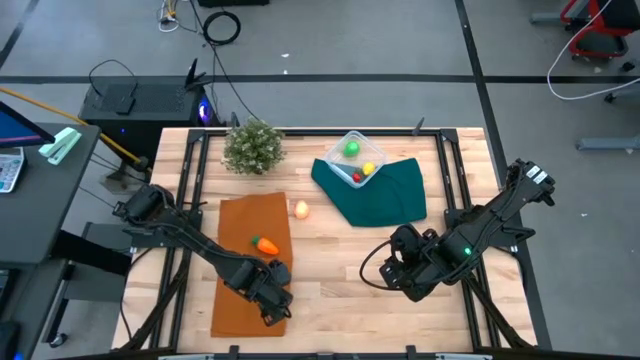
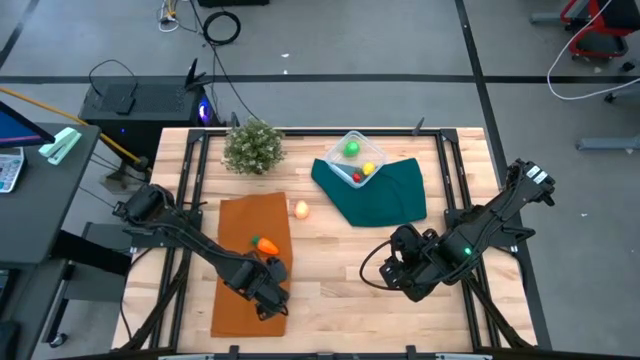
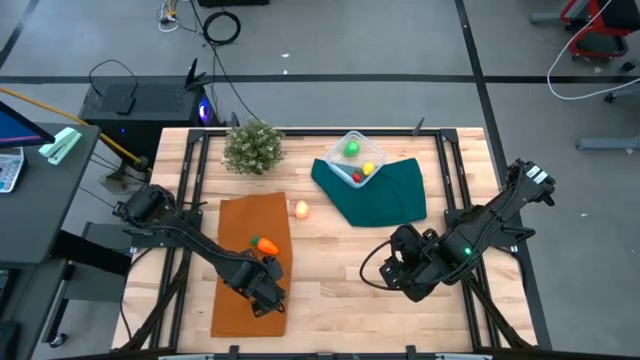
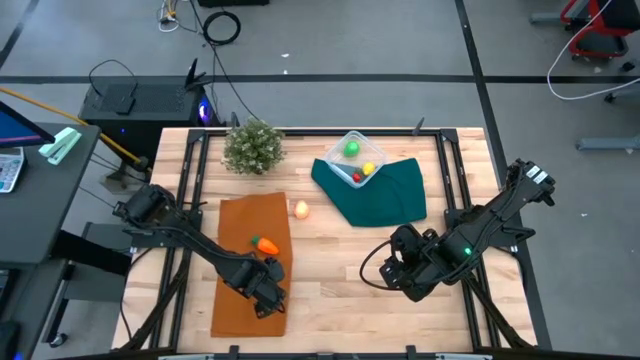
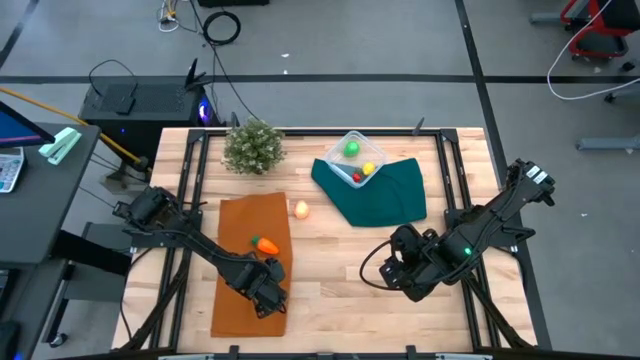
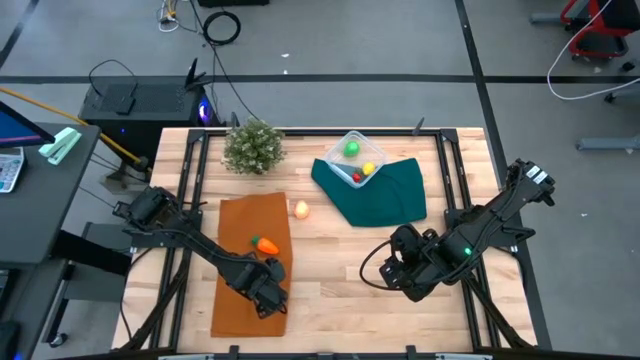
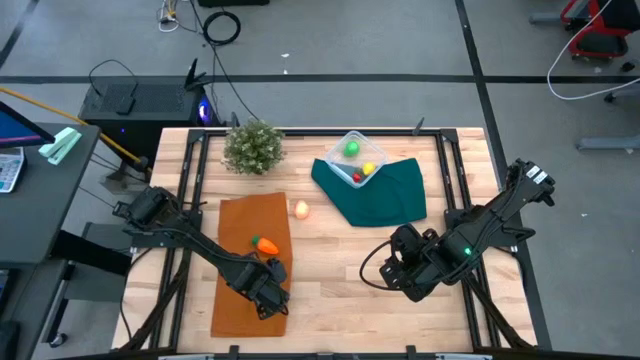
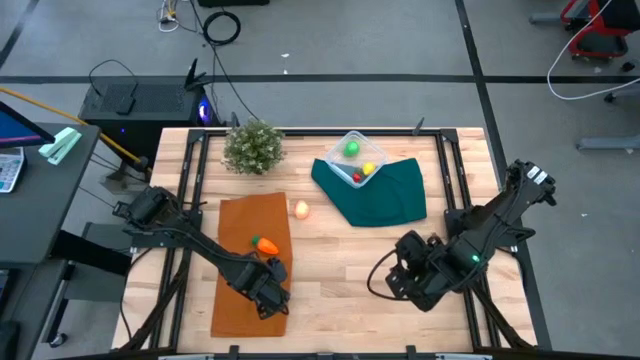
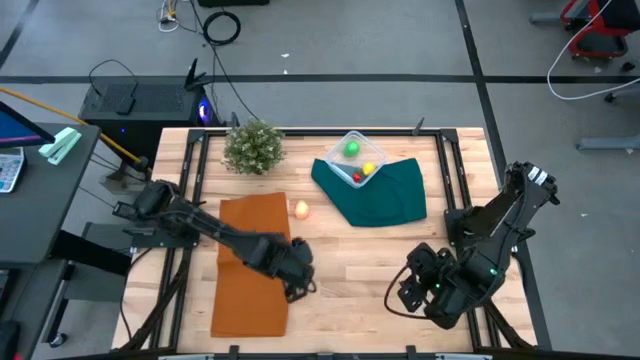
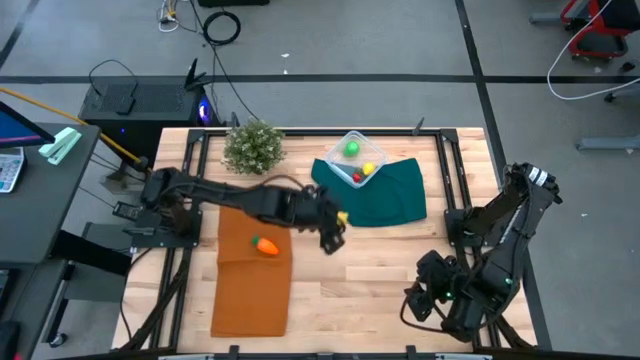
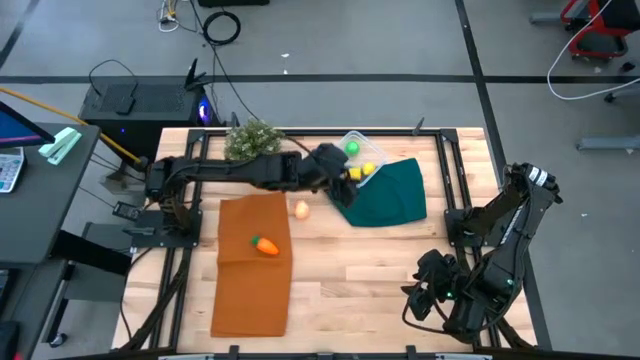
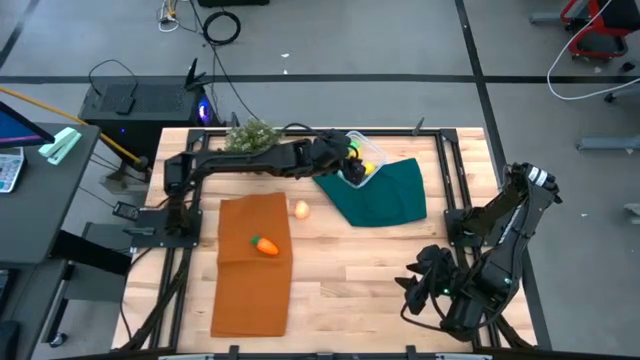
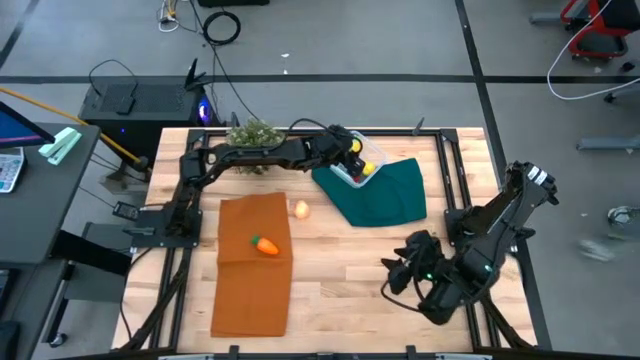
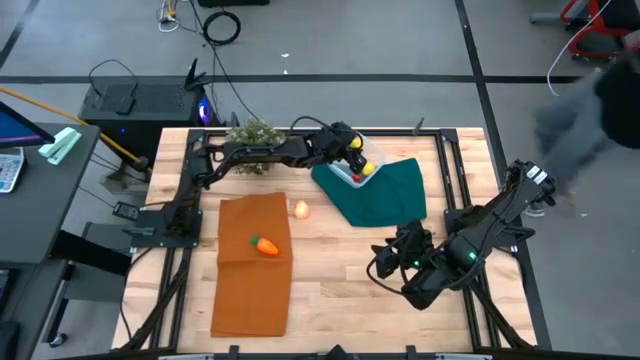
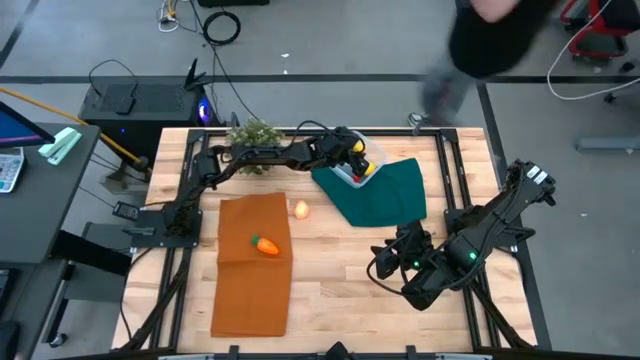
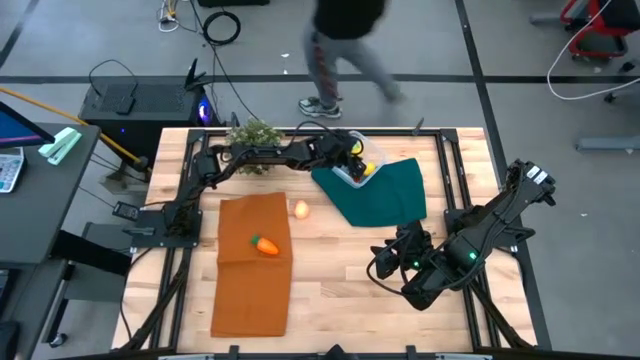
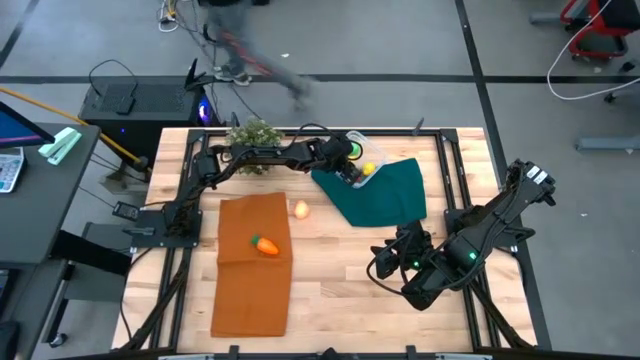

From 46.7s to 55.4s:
Task: Pick and placing Produce into tupperware
Put the lemon into the transparent bin

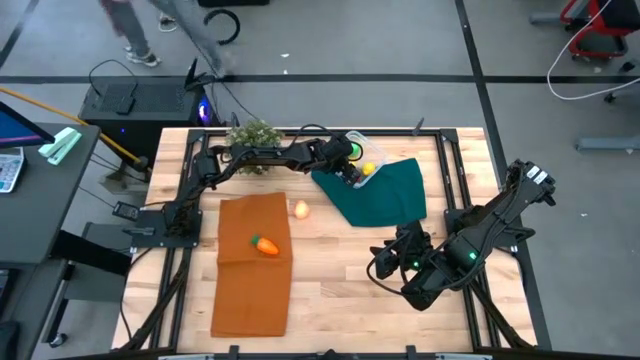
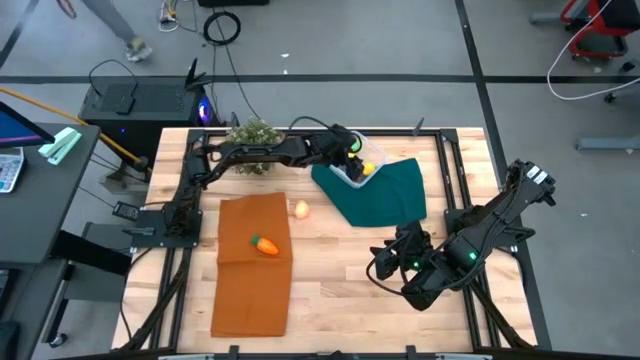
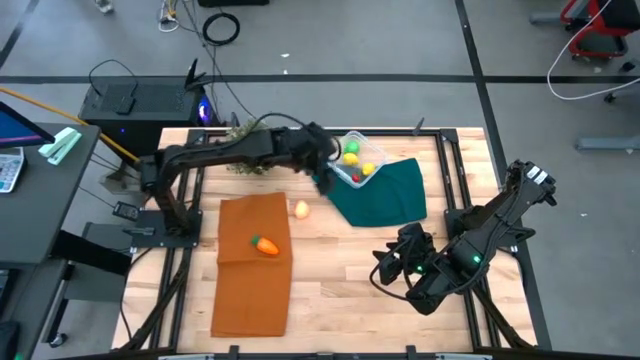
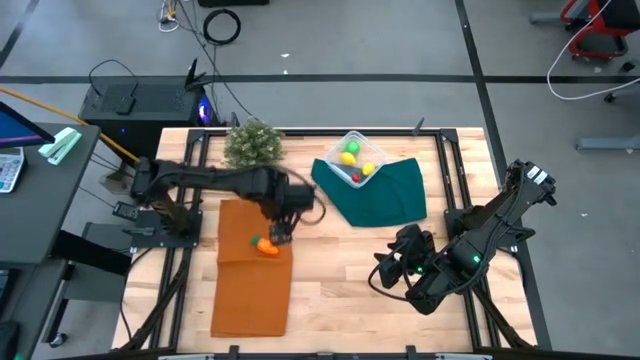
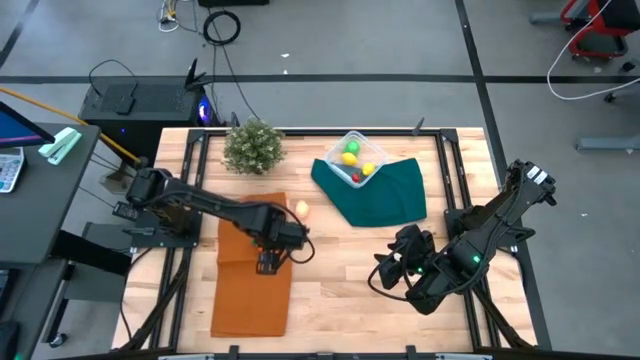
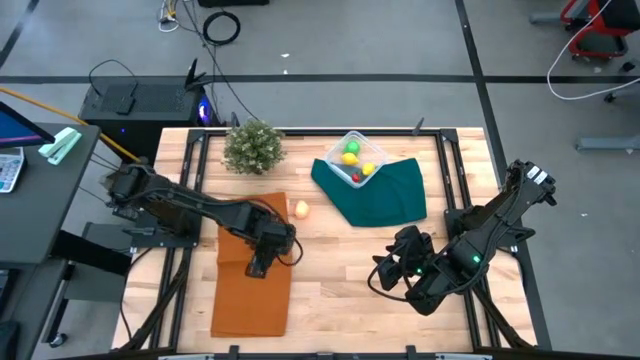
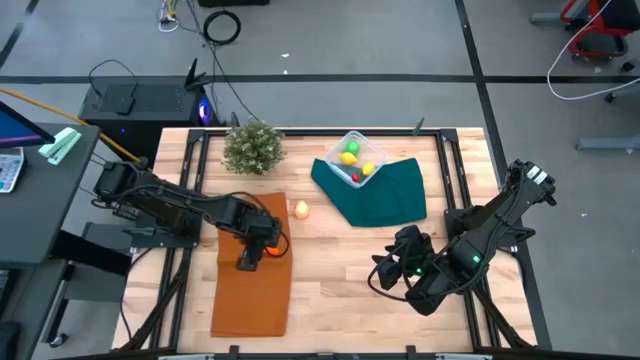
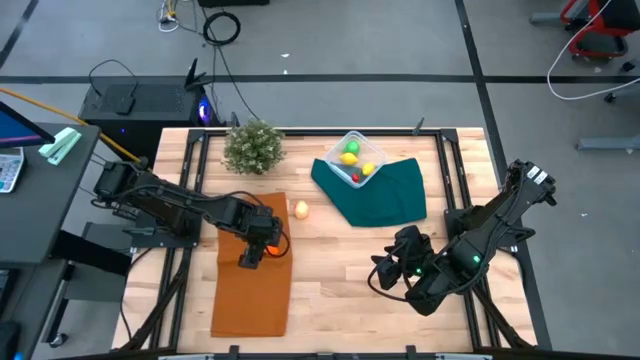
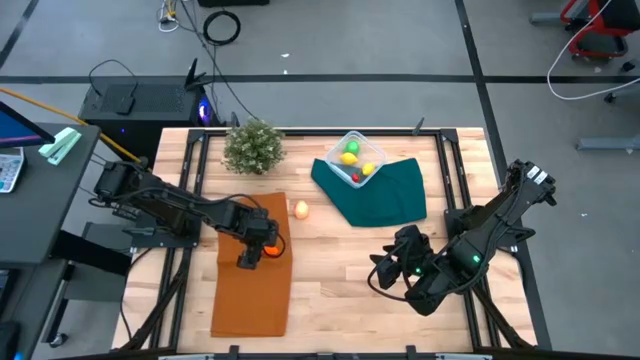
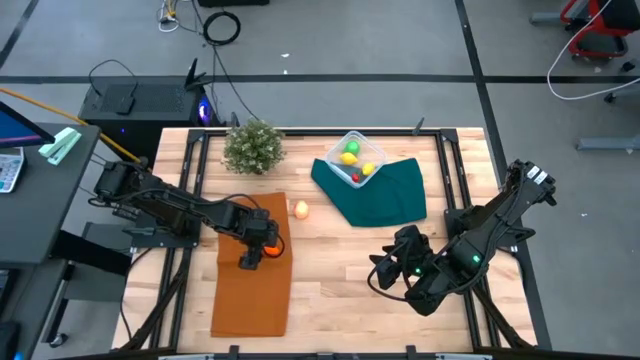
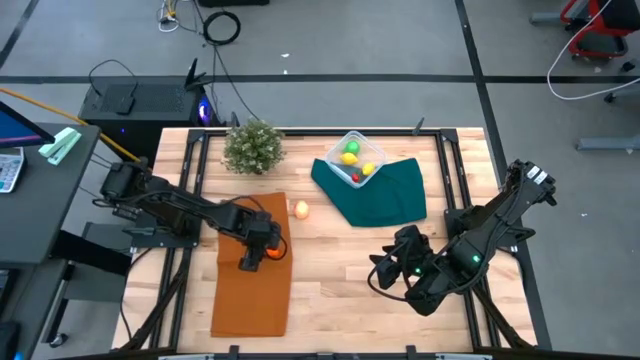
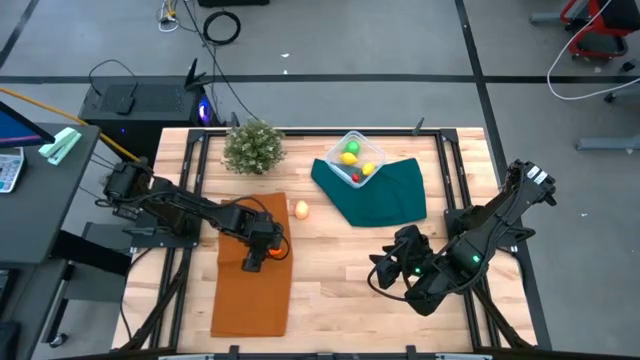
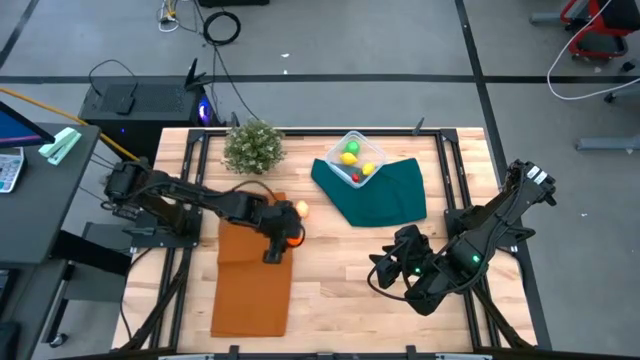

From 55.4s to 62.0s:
Put the carrot into the transparent bin

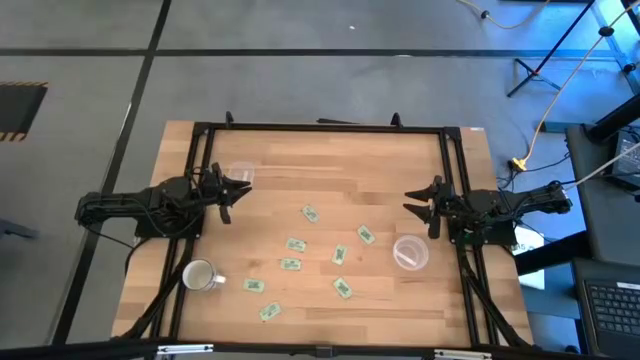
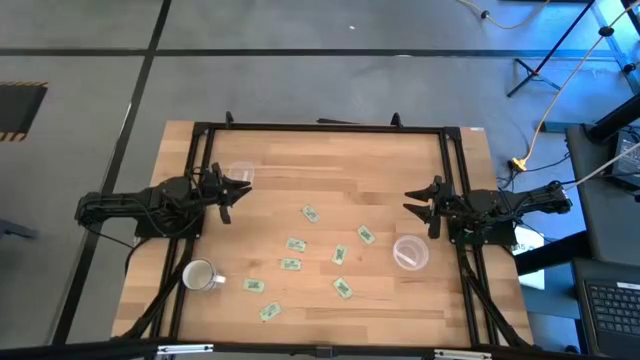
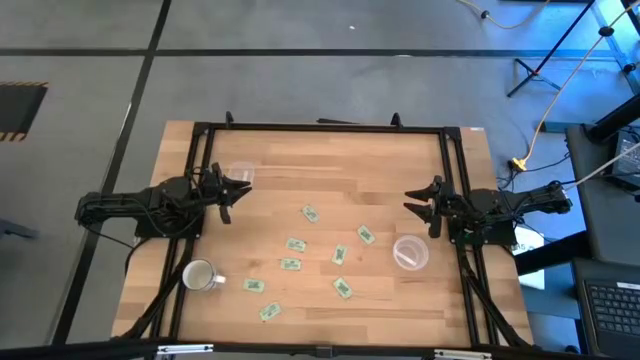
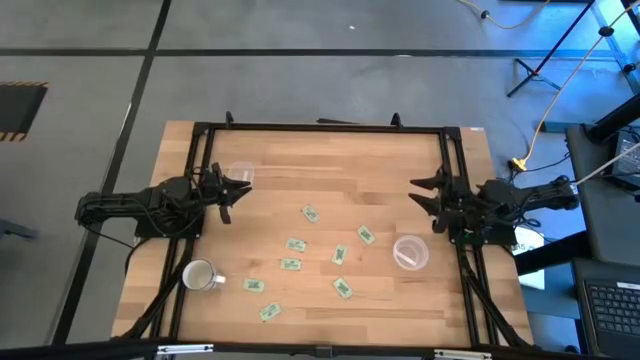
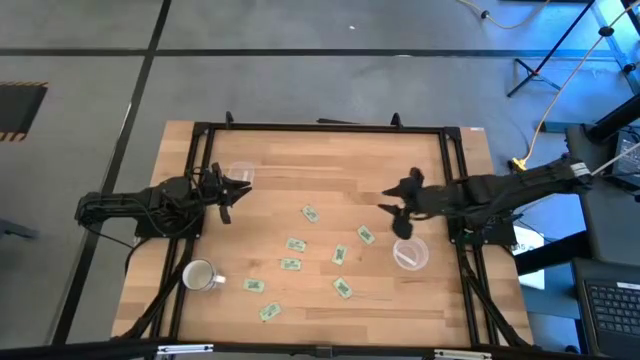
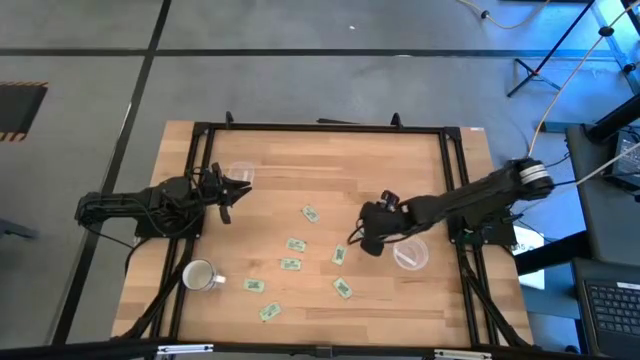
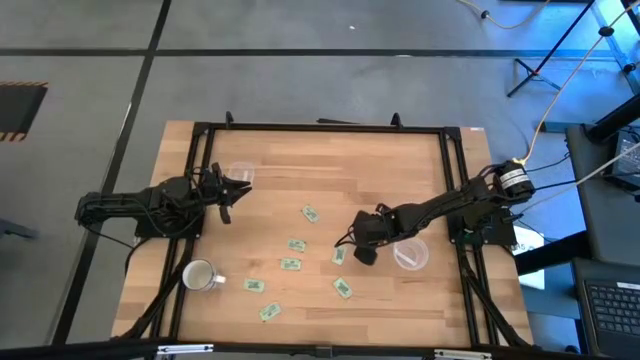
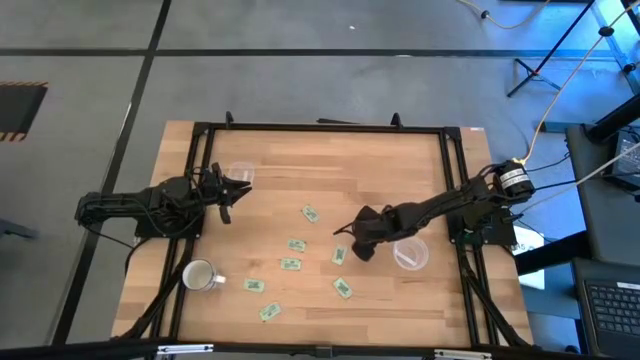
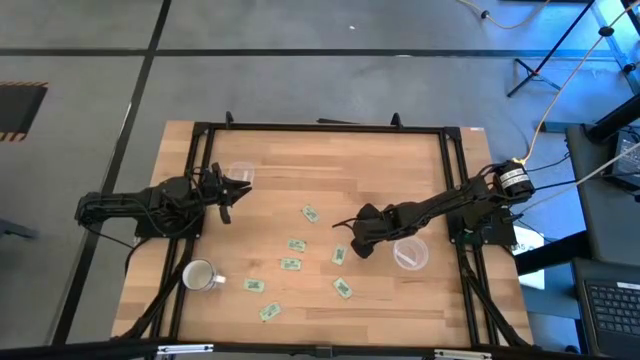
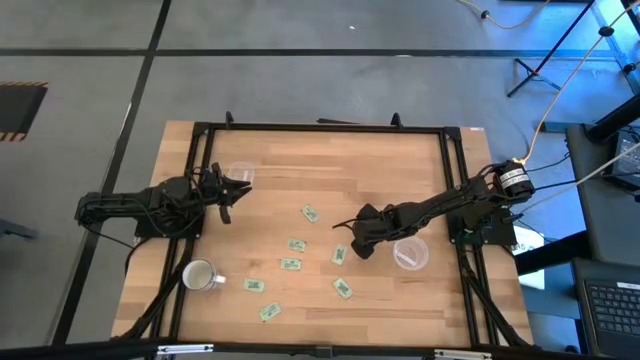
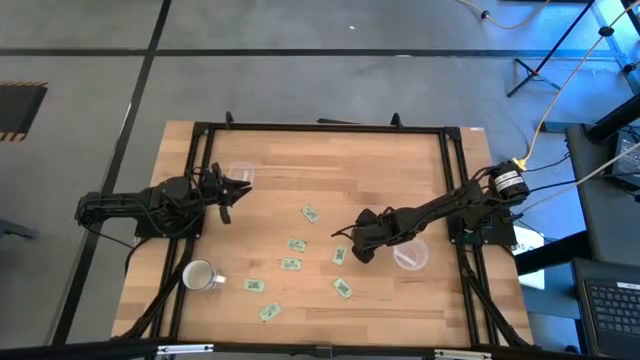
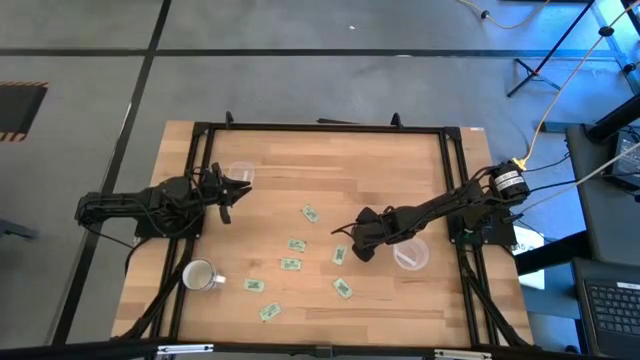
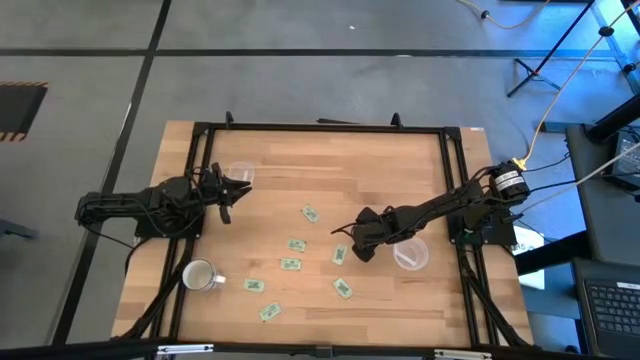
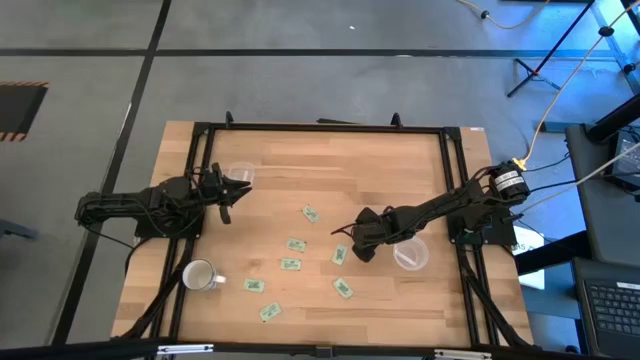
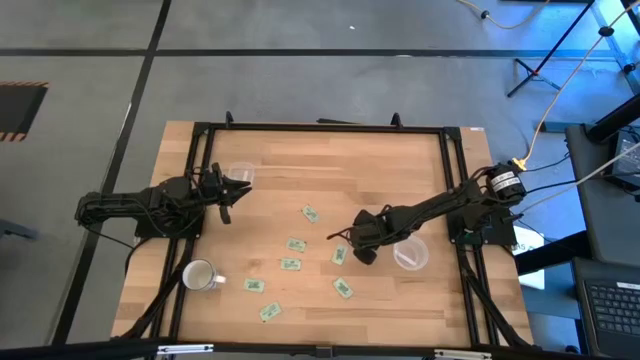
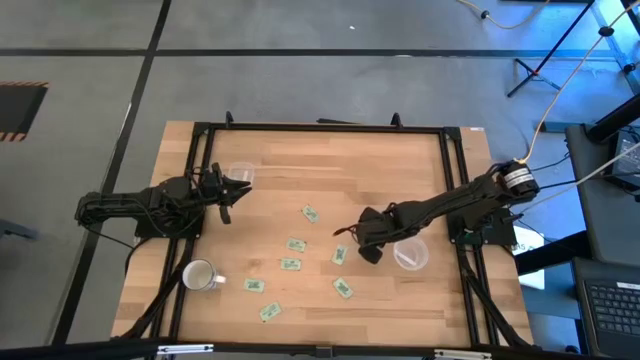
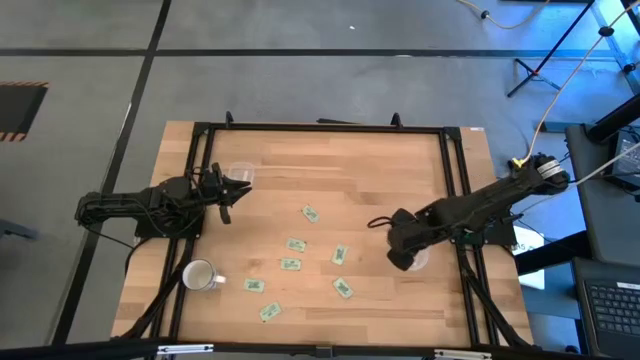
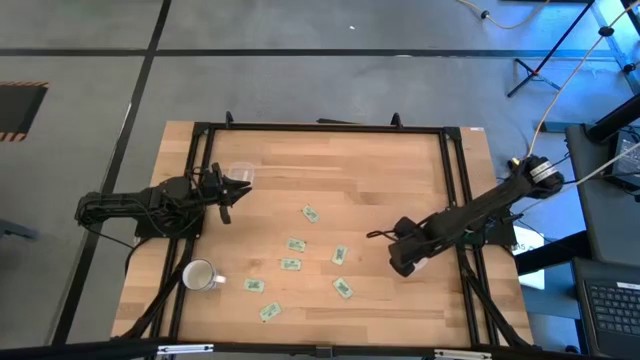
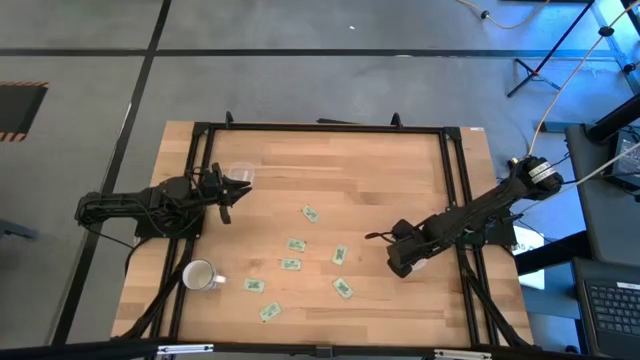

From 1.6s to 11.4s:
Task: Pick and place Stevia / Truvia into bins
Put the stevia packet into the round transparent container
